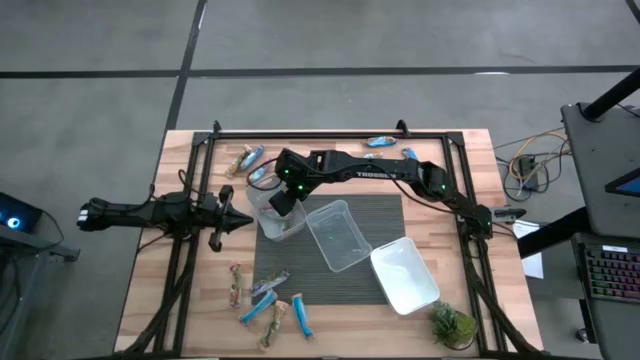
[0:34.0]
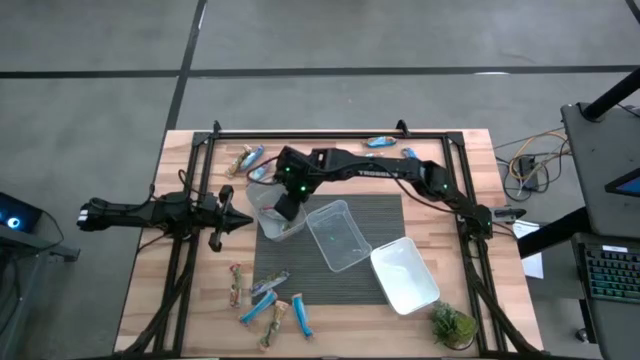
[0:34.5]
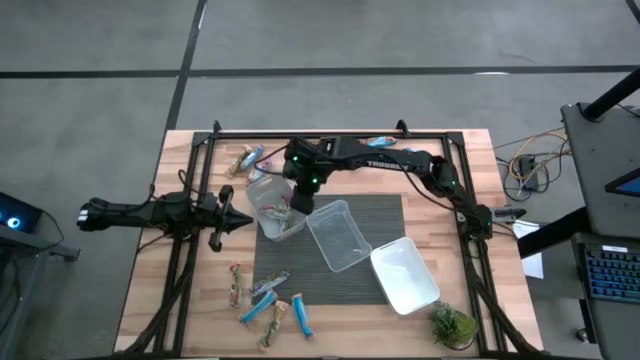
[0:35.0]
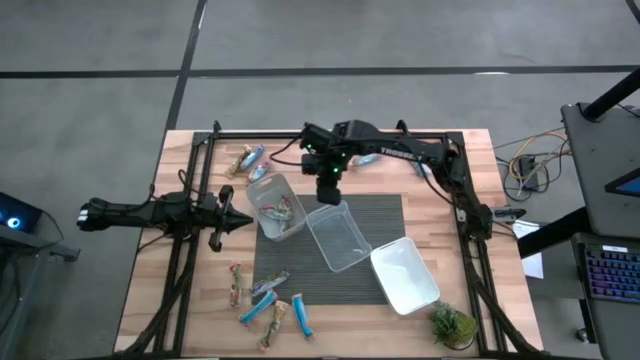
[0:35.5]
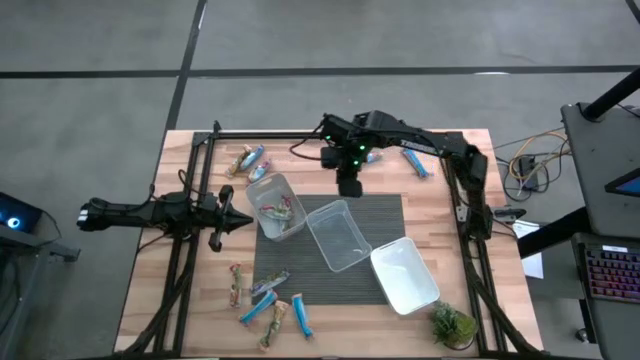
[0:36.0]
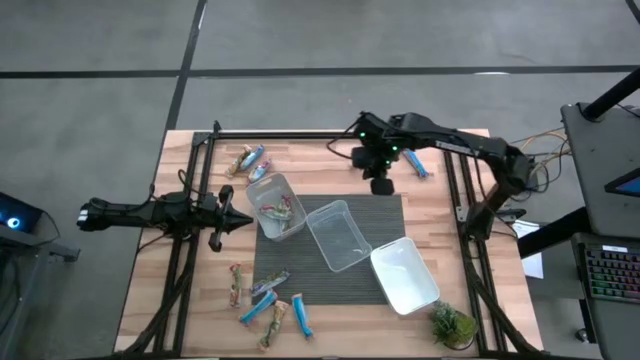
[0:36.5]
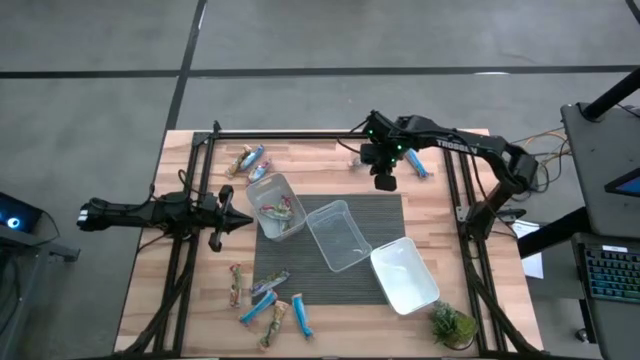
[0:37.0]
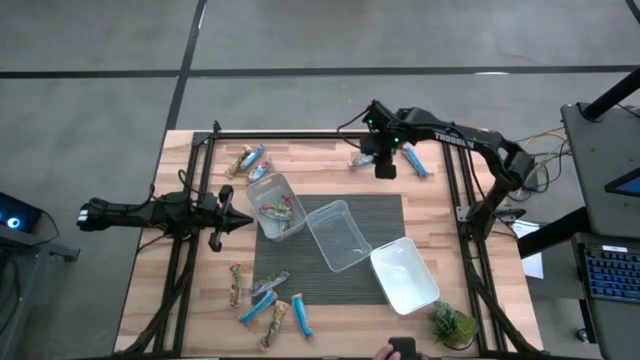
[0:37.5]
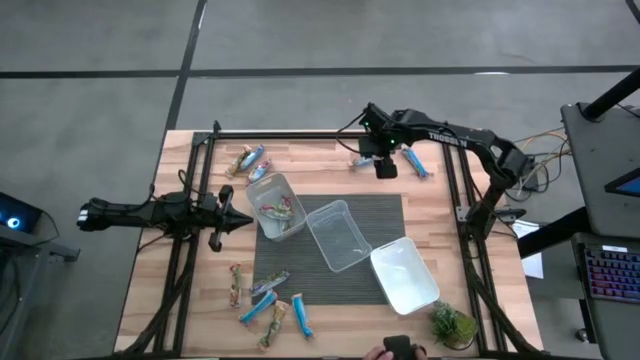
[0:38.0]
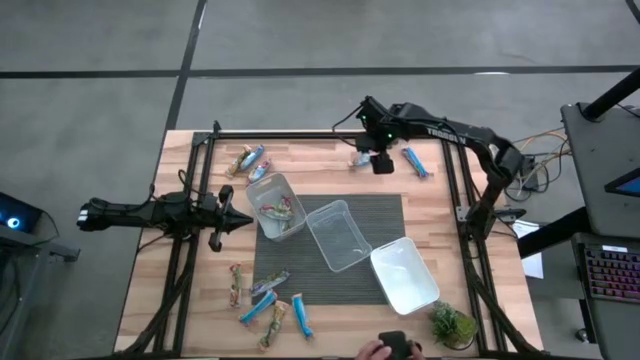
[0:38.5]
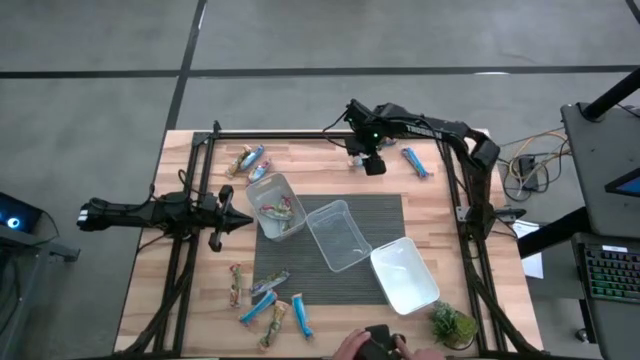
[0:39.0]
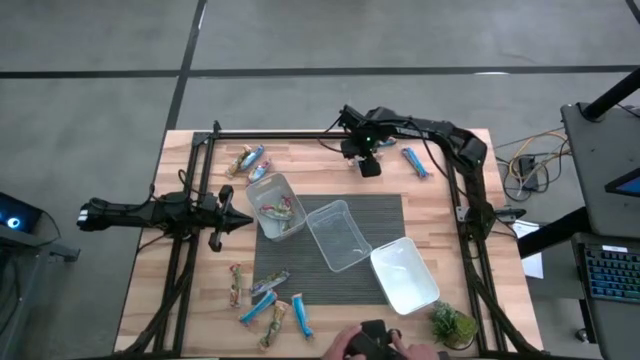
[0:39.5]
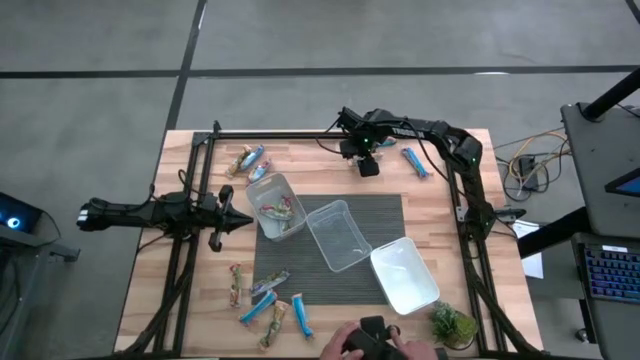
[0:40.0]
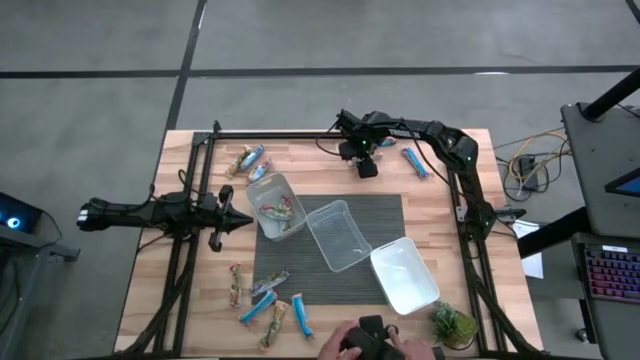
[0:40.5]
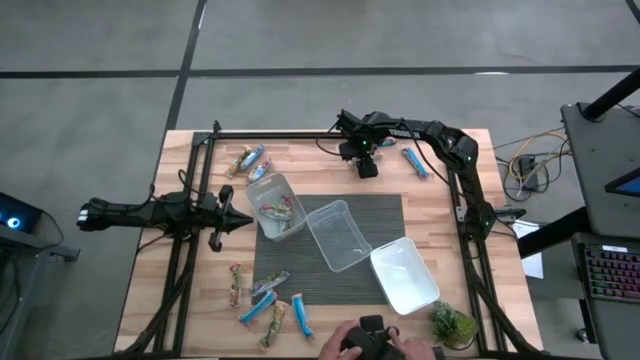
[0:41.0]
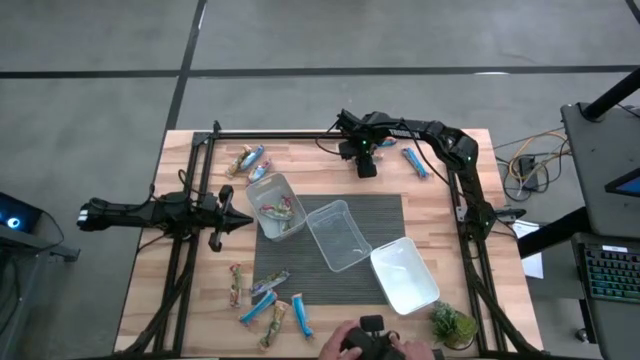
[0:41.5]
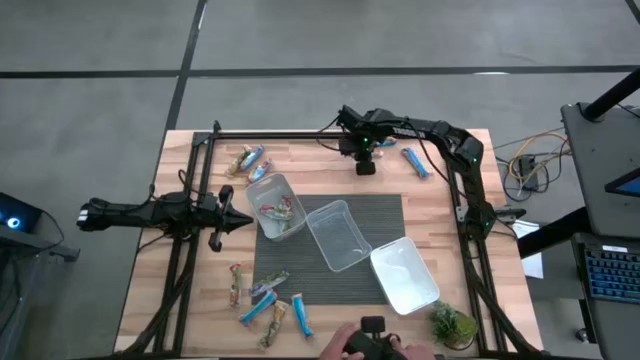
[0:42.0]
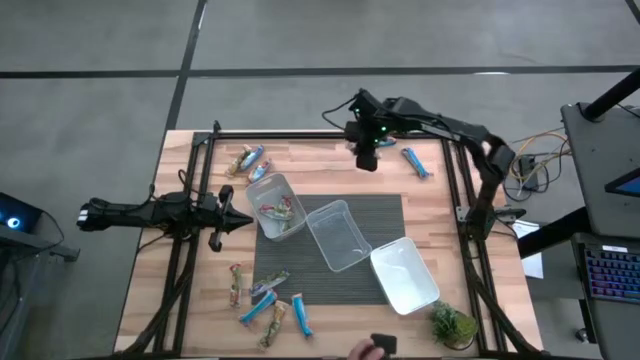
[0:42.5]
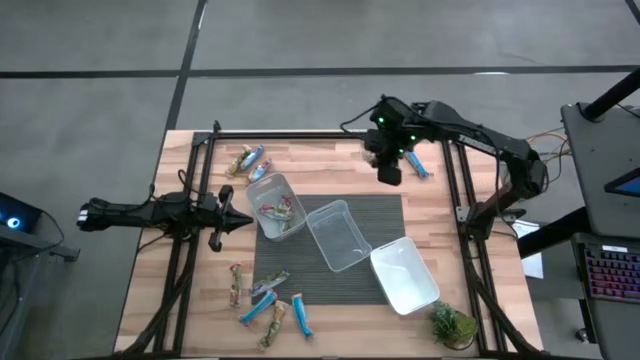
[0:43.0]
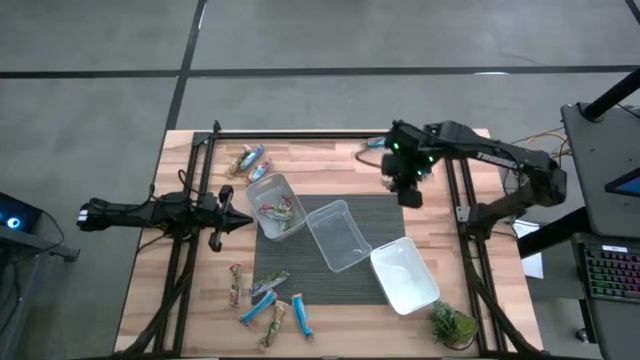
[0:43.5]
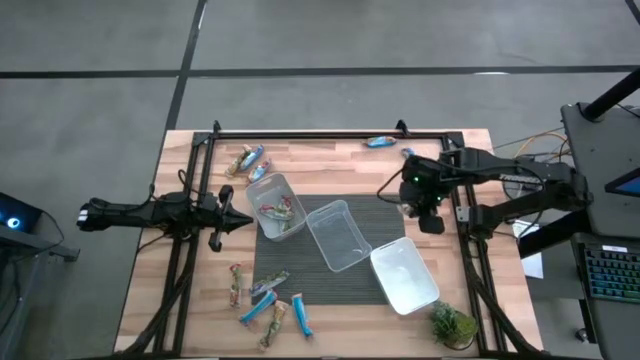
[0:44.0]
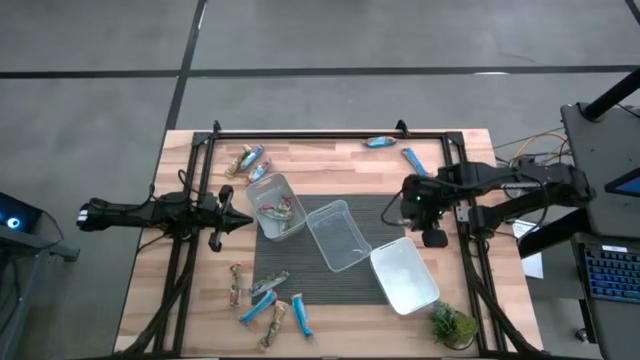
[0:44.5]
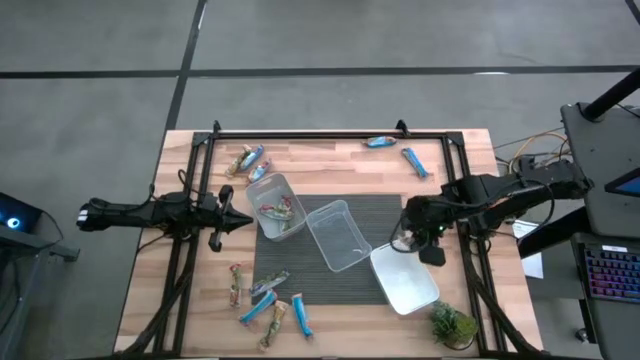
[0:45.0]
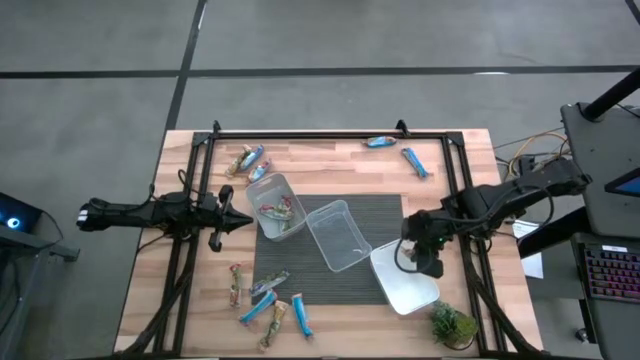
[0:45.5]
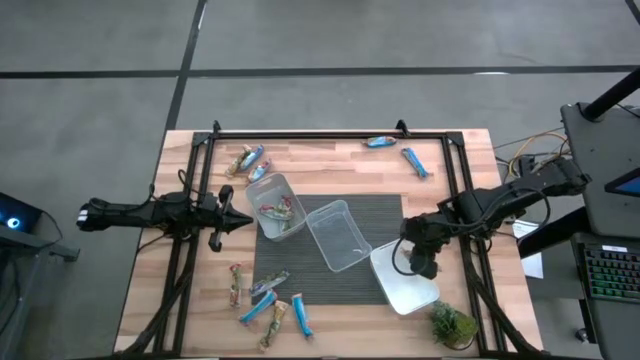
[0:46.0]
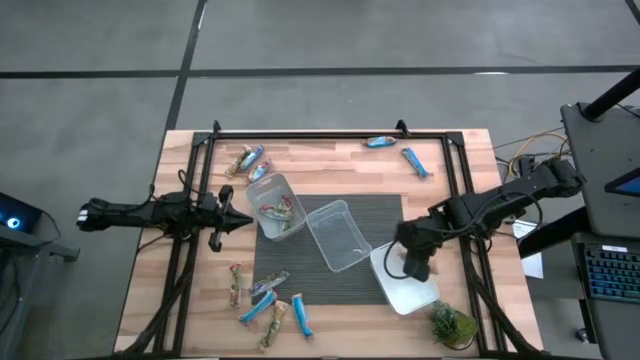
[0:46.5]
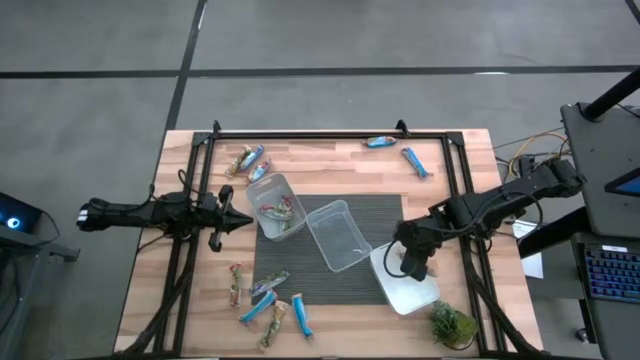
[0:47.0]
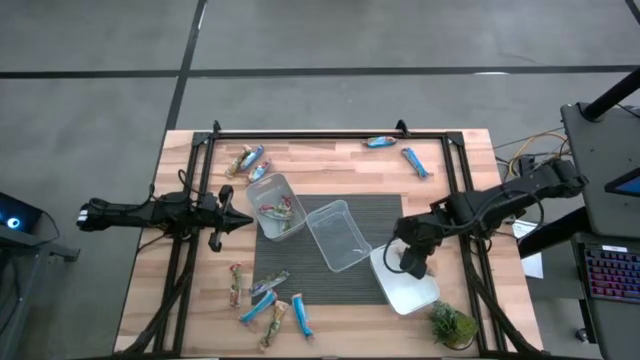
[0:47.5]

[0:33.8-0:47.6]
Task: Pick and place Granola Bars by type
Put the yellow granola bar into the white bin

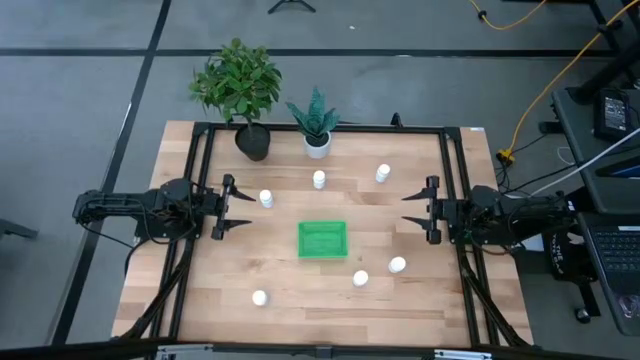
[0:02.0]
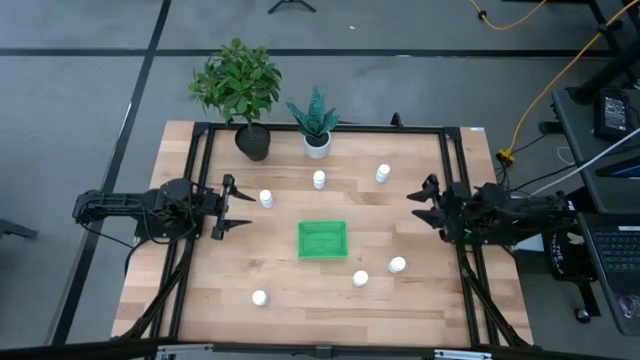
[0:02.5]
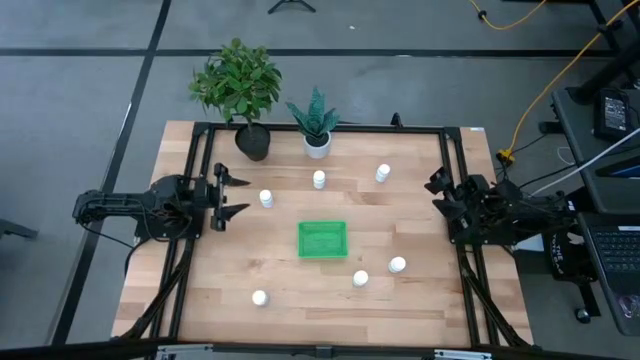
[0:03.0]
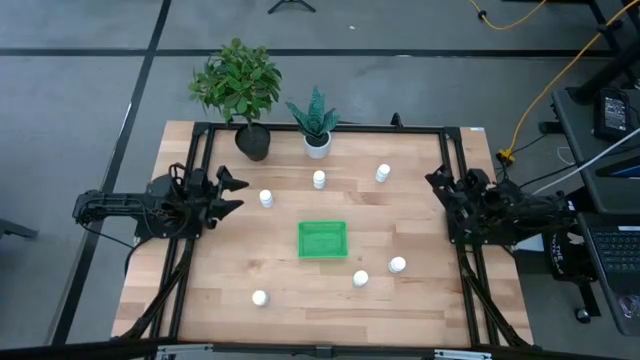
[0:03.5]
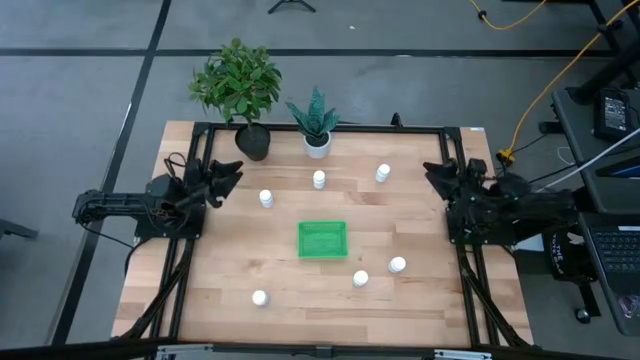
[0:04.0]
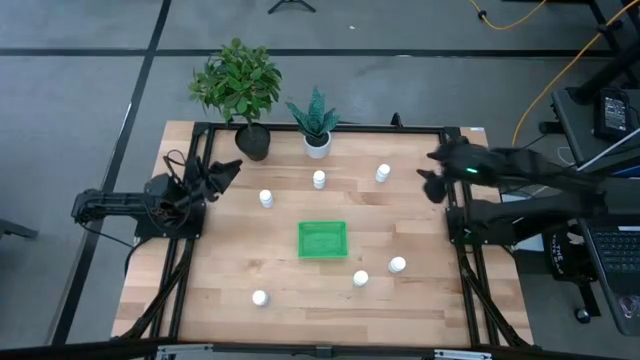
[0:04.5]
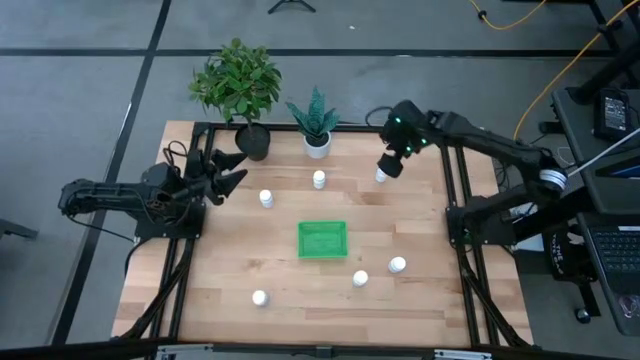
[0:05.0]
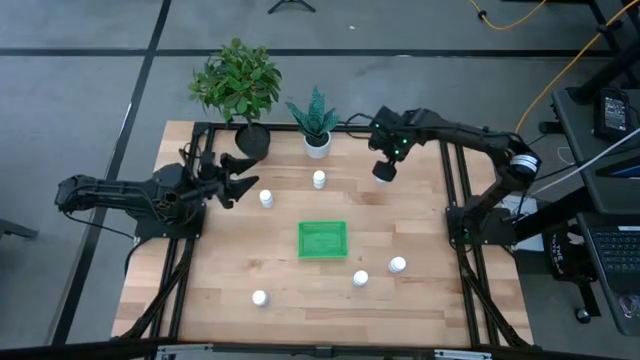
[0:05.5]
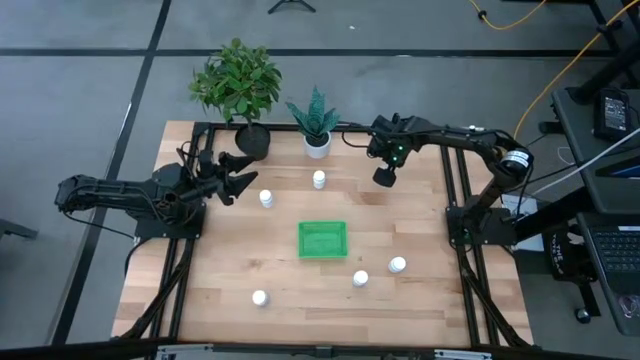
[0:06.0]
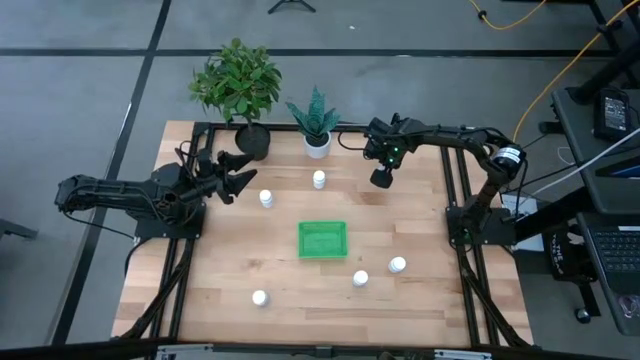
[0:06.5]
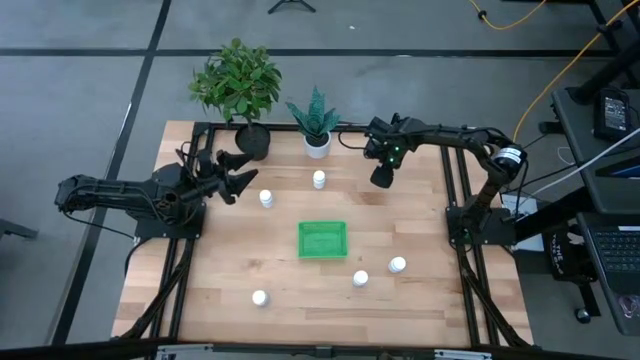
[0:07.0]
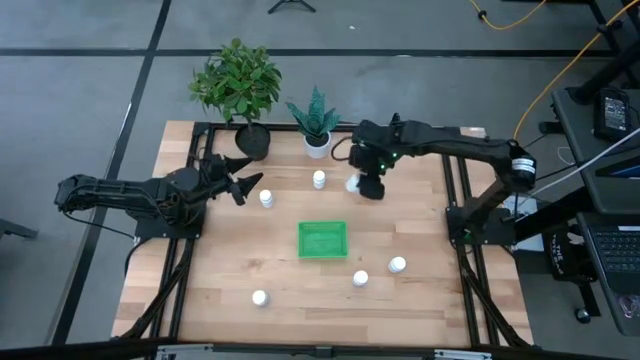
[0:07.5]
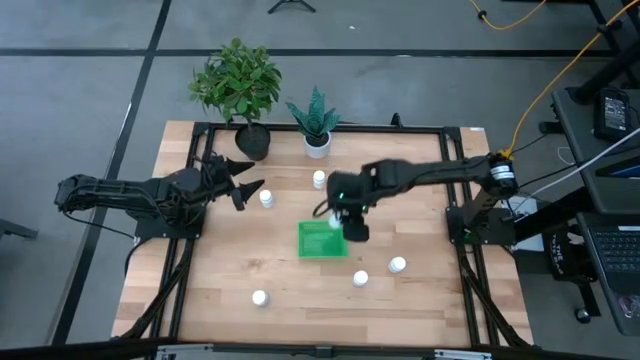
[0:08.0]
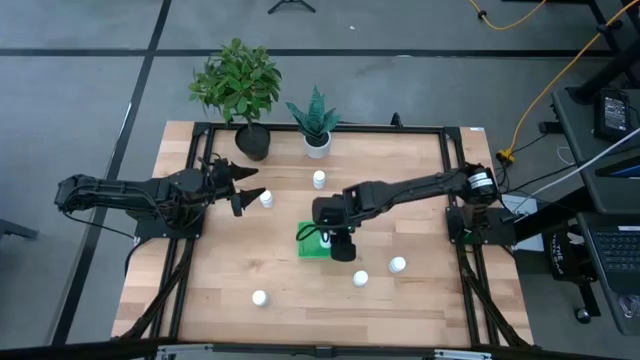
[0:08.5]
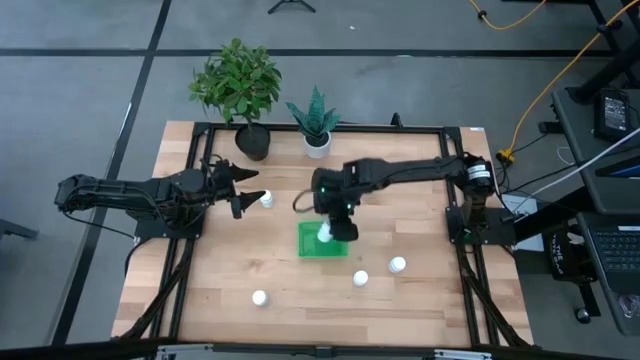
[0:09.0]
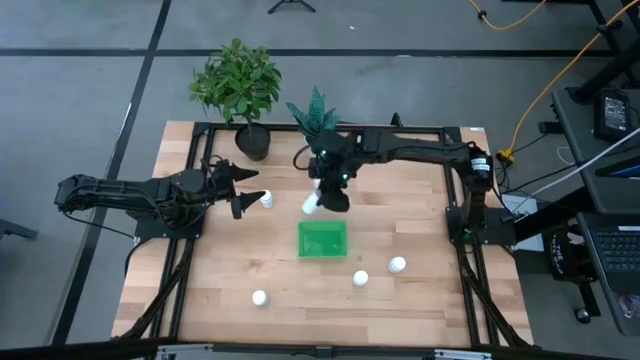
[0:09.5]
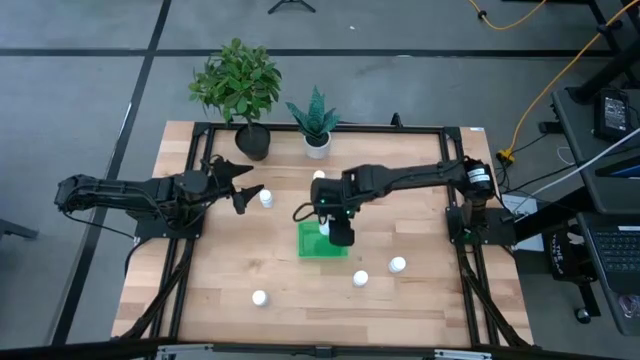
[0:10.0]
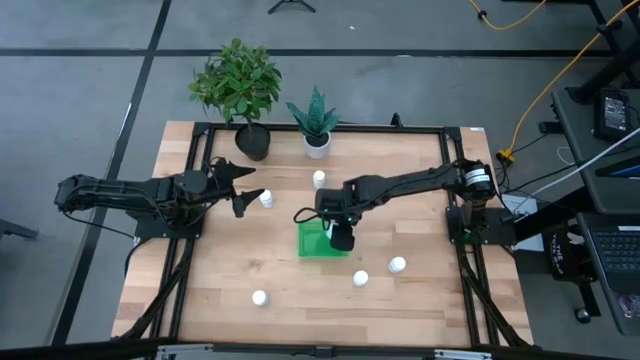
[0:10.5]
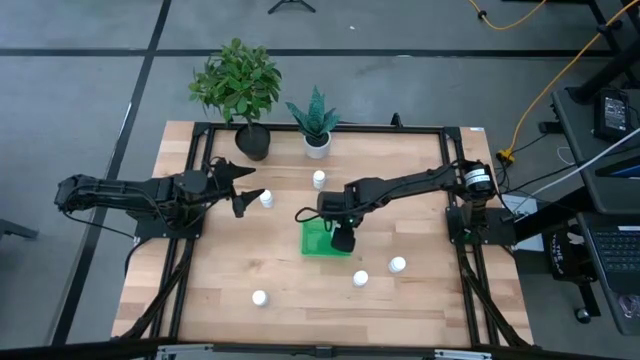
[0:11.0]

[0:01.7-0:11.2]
Task: Pick and place pill bottles into a basket
Put the white pill bottle into the green bin
